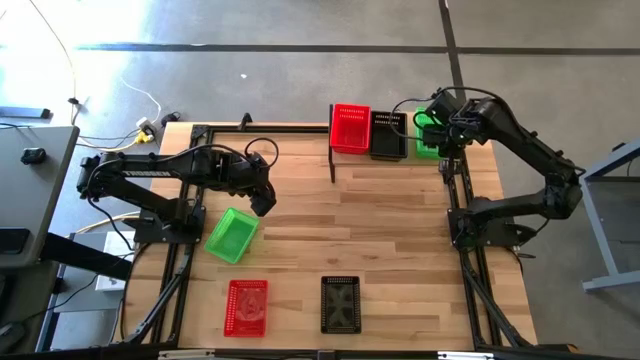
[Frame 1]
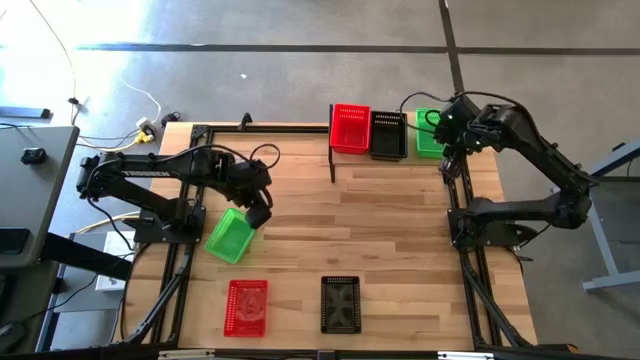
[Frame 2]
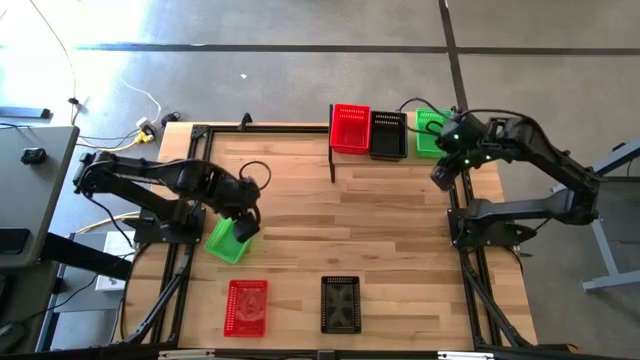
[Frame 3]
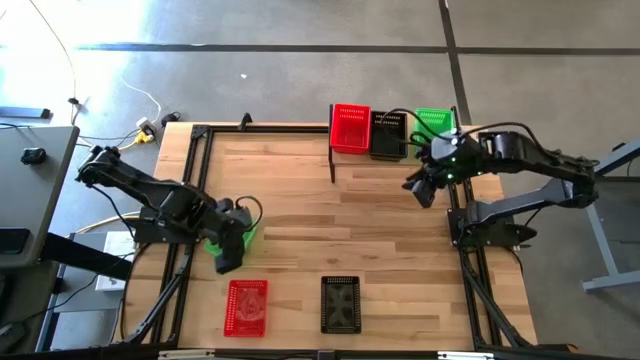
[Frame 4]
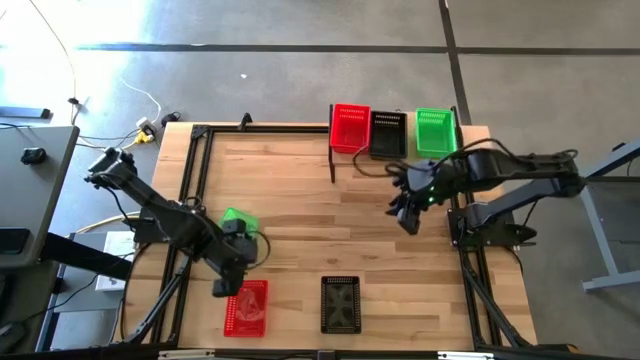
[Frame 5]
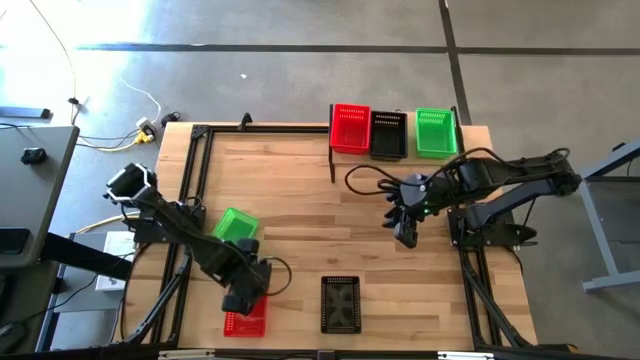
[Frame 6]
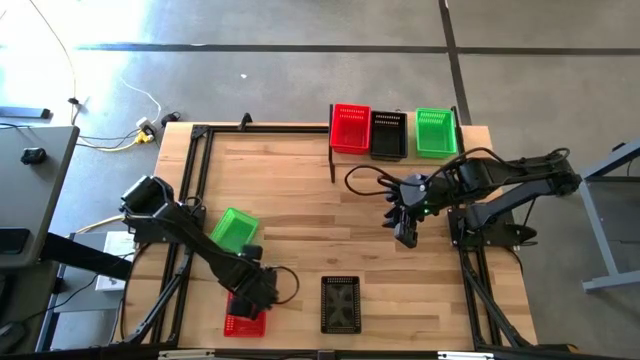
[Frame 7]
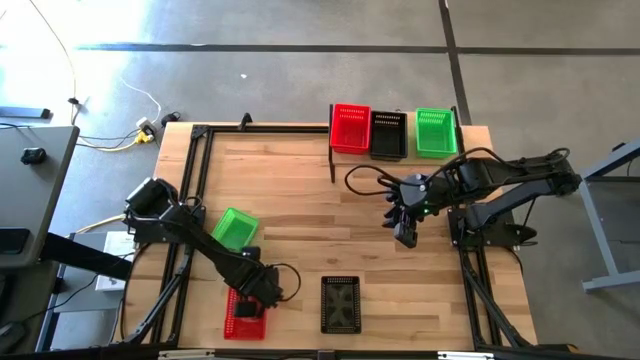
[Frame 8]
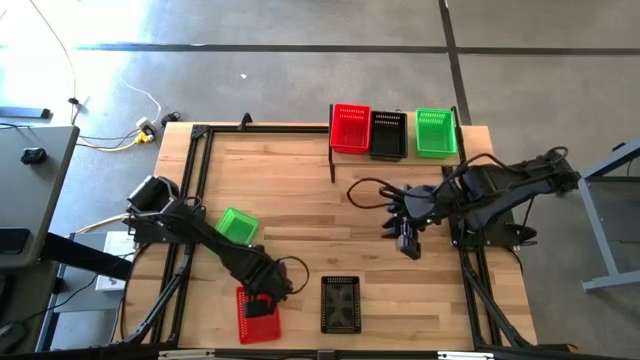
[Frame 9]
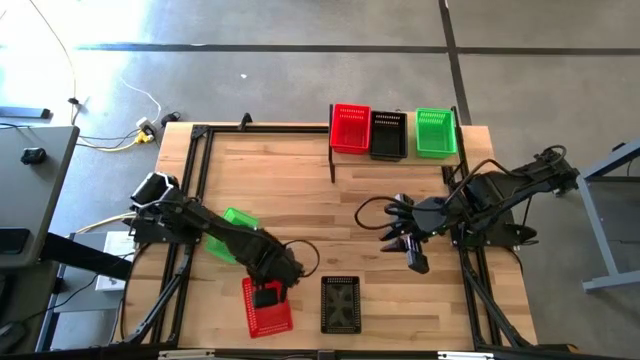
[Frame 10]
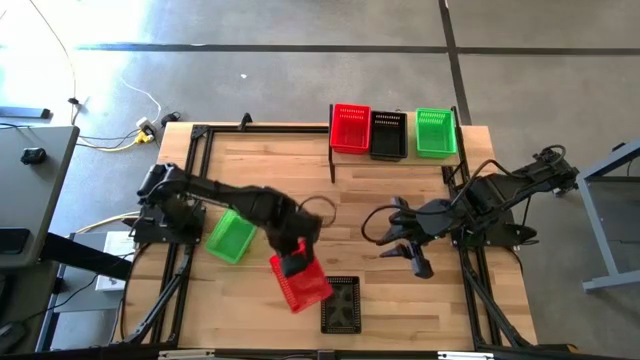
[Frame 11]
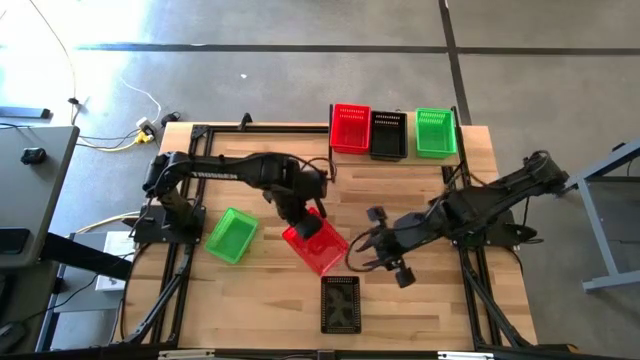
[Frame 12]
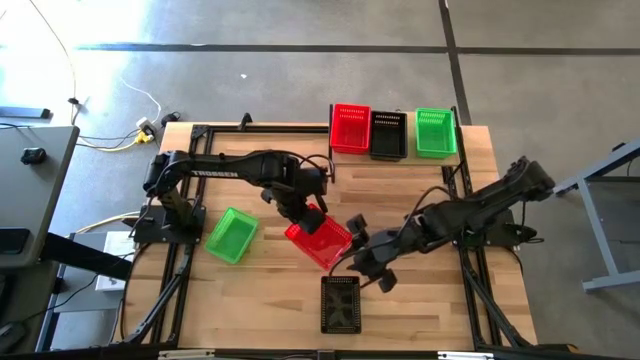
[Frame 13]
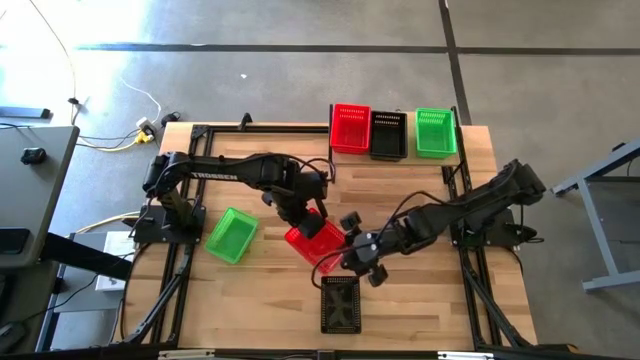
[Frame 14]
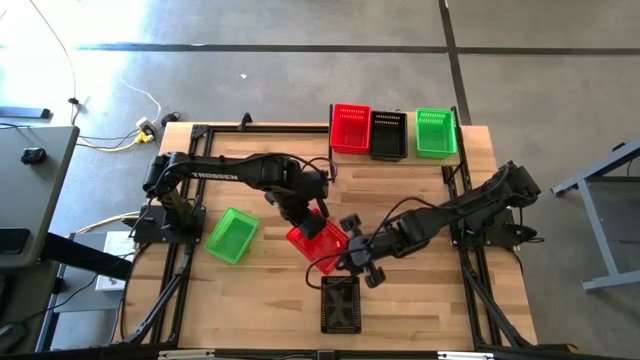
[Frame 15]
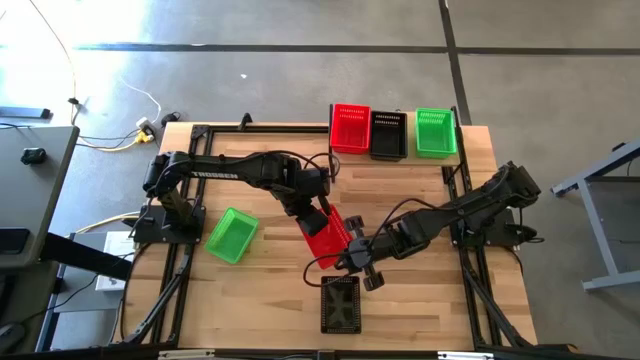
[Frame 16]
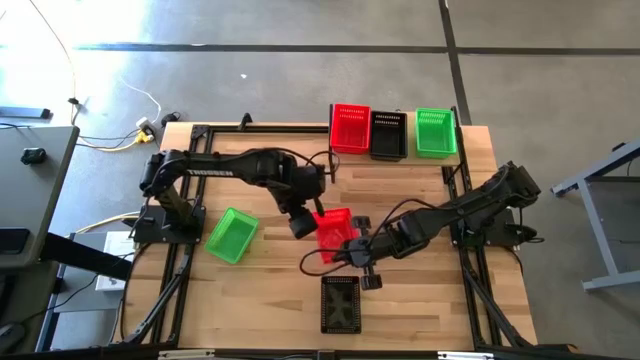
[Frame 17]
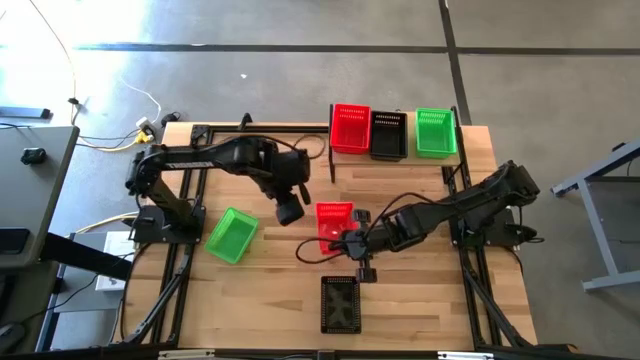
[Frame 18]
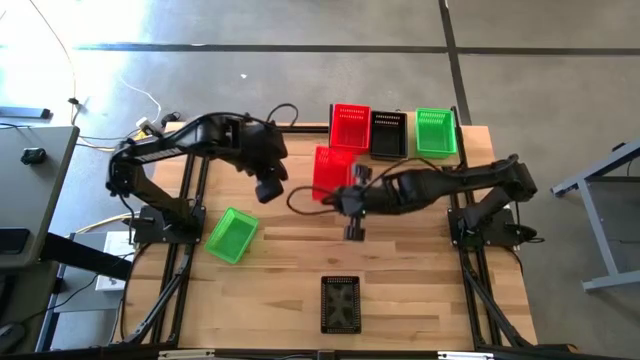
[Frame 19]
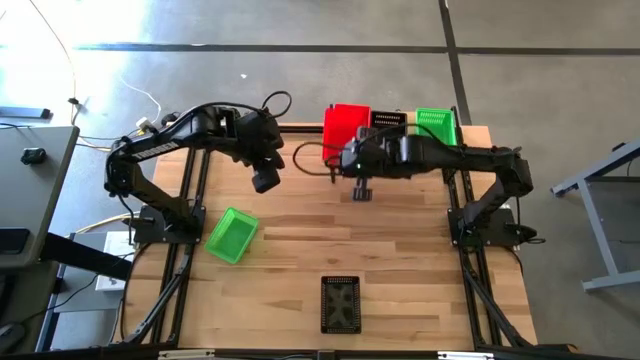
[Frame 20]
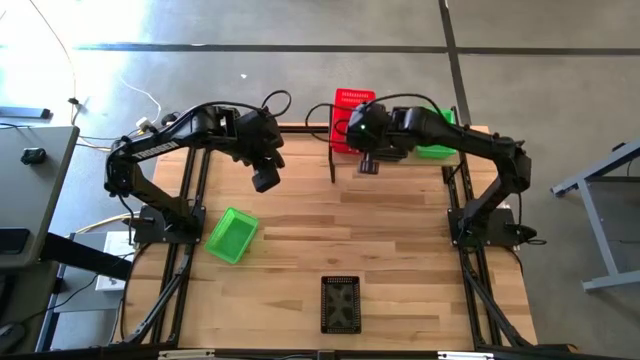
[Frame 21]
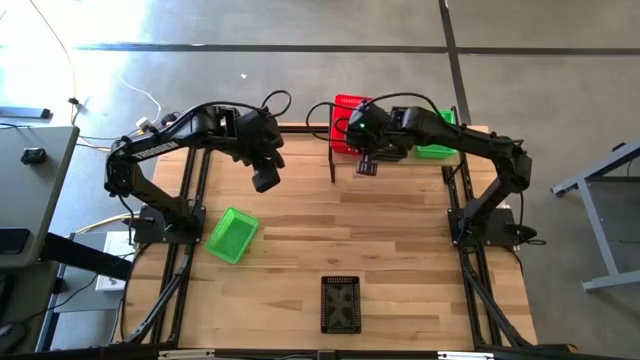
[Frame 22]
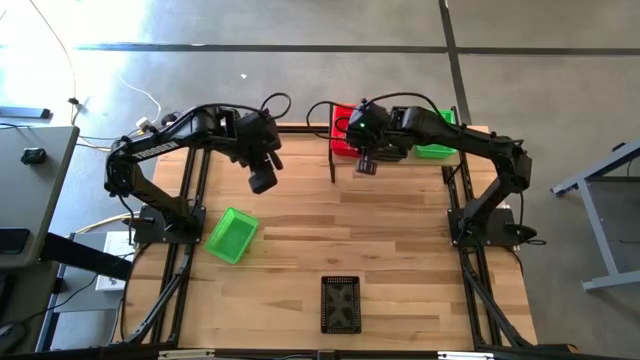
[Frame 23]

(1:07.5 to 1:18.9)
Task: Stack baskets on shelf by color
Stack the red bin on top of the red bin on the shelf

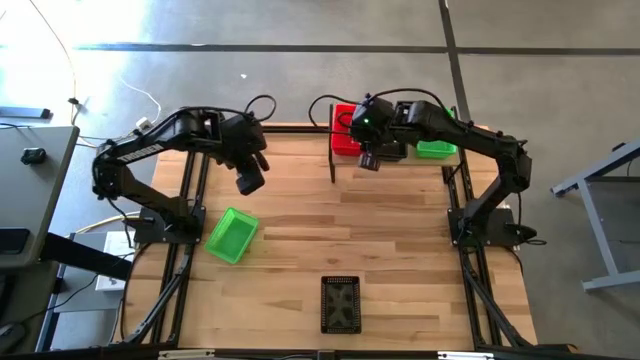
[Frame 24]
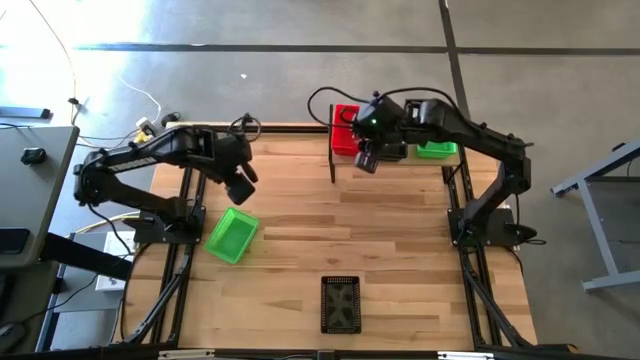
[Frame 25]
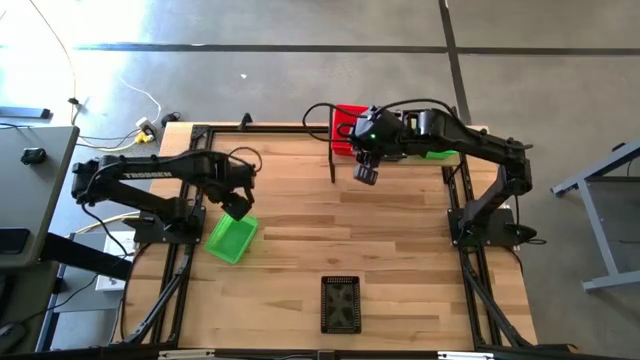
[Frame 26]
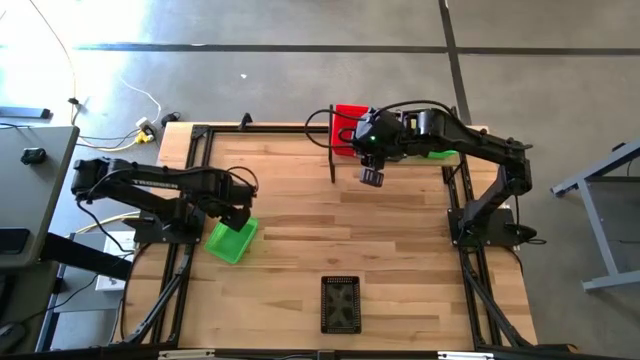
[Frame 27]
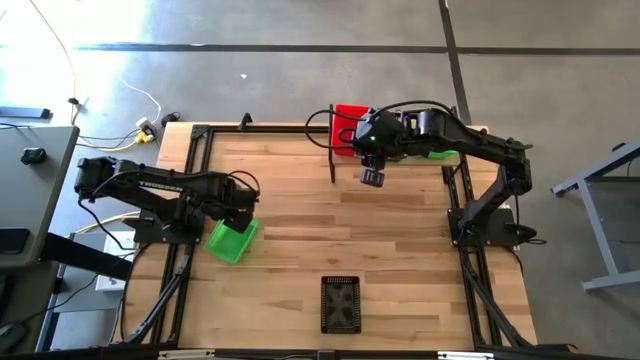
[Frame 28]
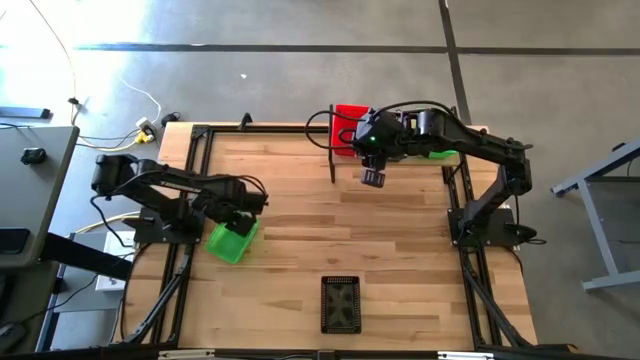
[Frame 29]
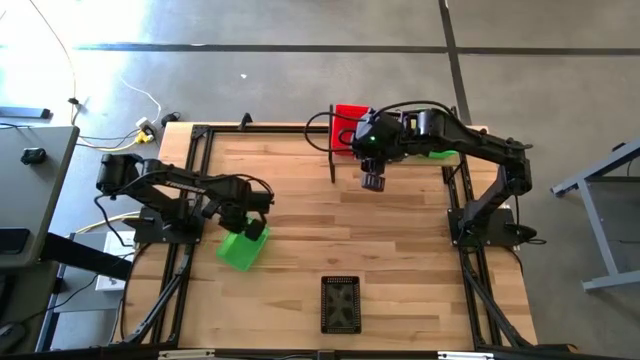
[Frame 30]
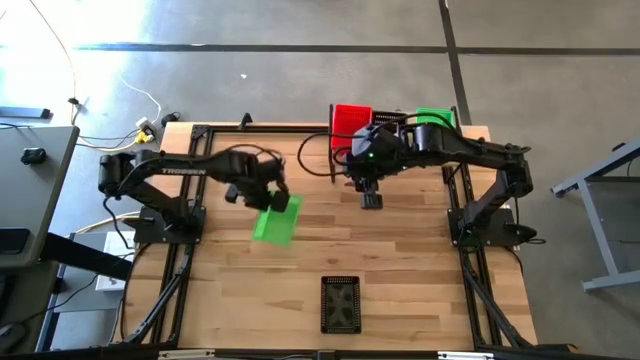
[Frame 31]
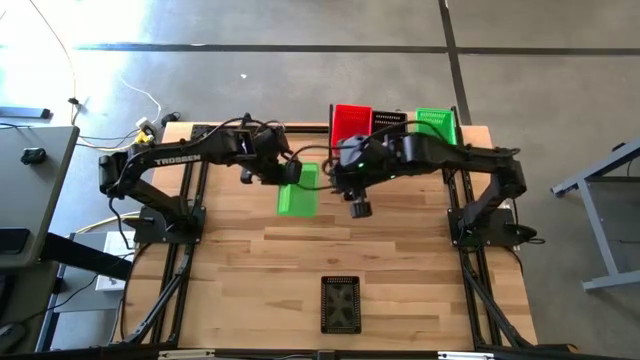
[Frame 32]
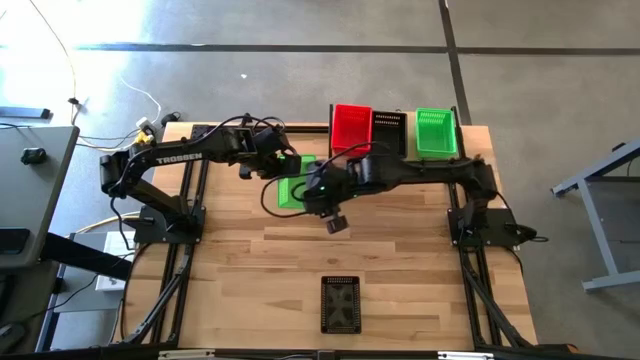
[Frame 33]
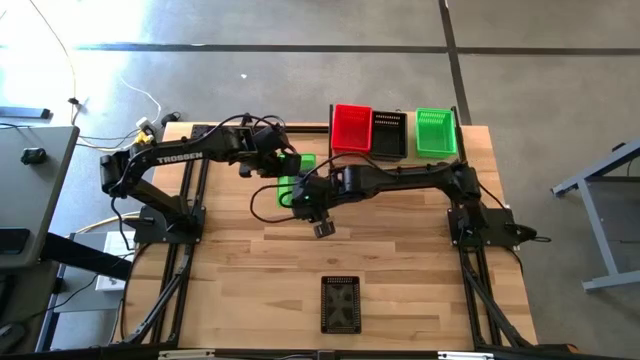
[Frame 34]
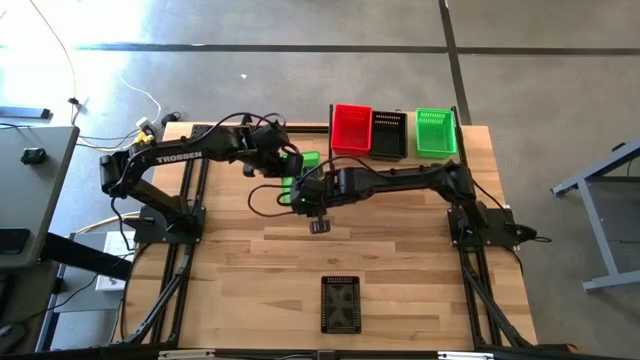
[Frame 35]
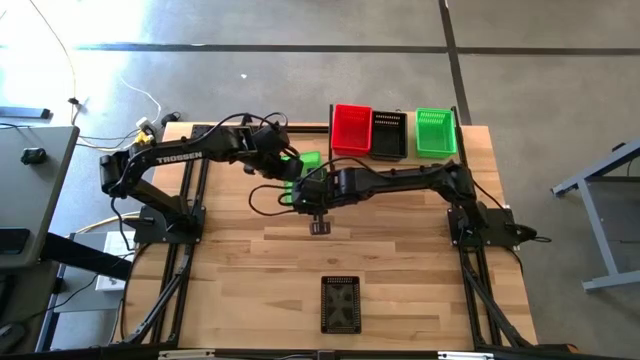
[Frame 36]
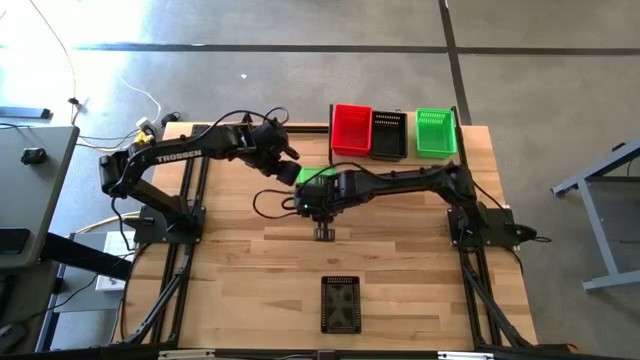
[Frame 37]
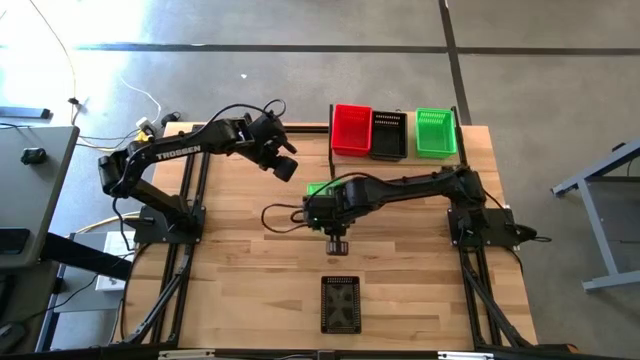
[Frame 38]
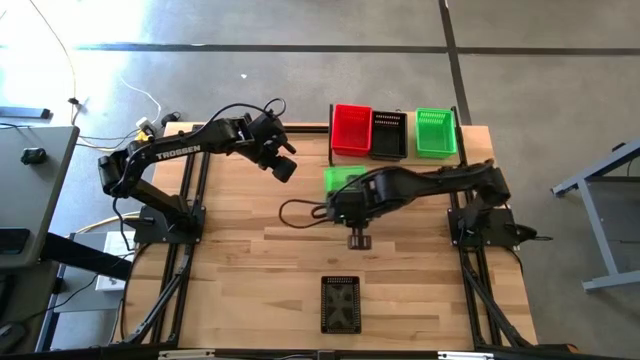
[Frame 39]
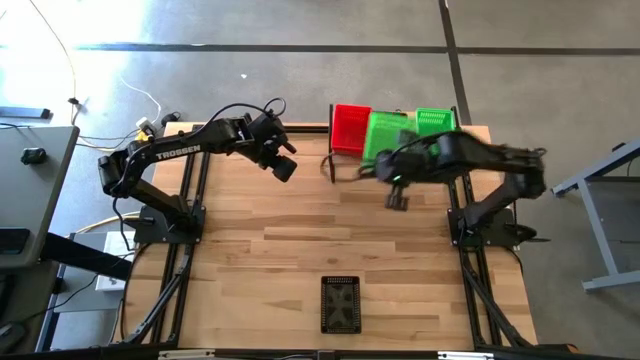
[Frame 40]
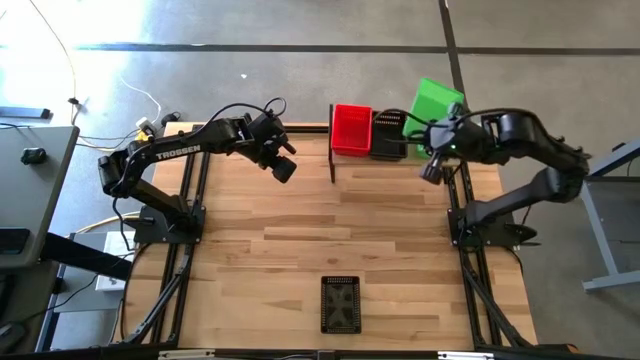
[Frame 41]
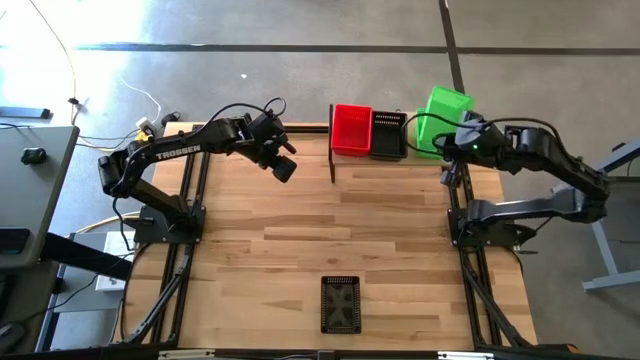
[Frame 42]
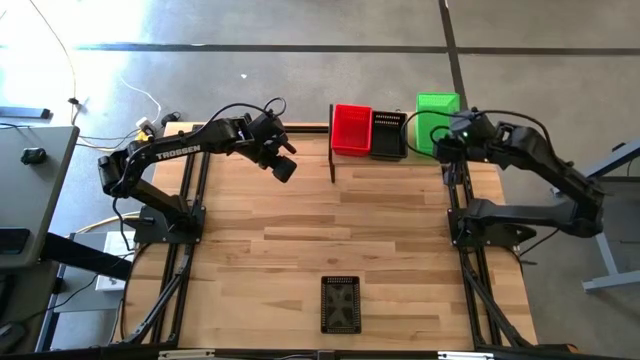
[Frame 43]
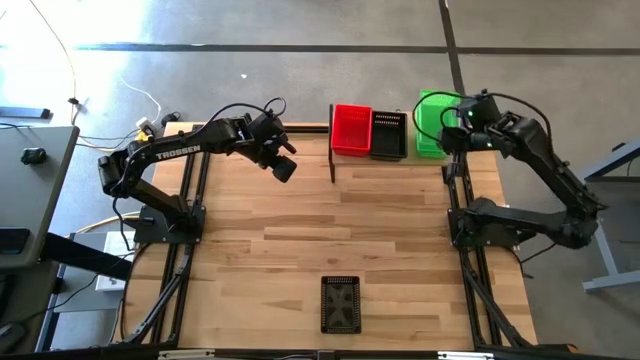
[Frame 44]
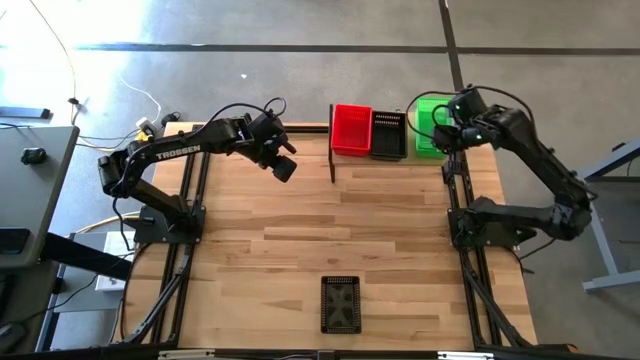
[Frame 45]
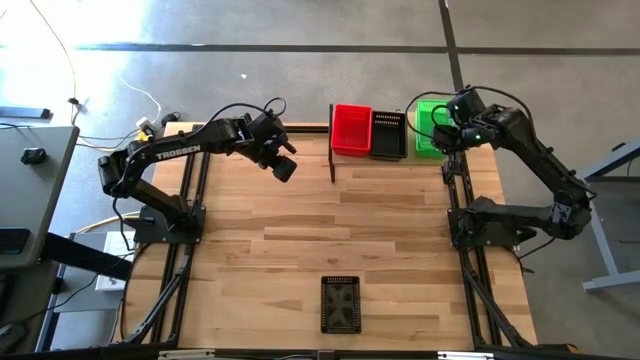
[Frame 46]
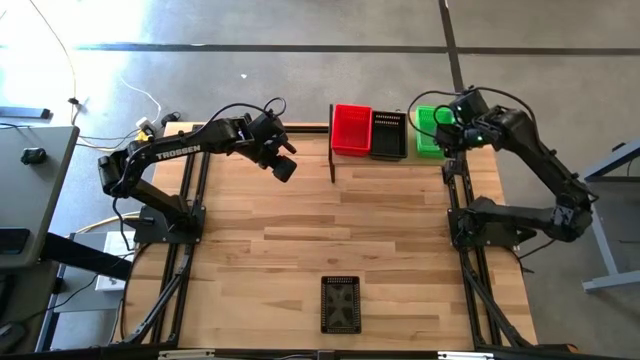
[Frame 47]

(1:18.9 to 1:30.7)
Stack the green bin on top of the green bin on the shelf
